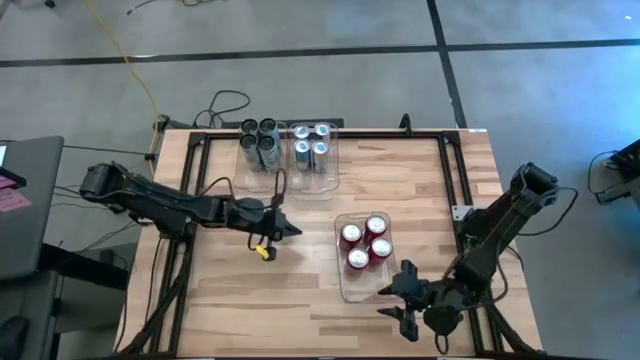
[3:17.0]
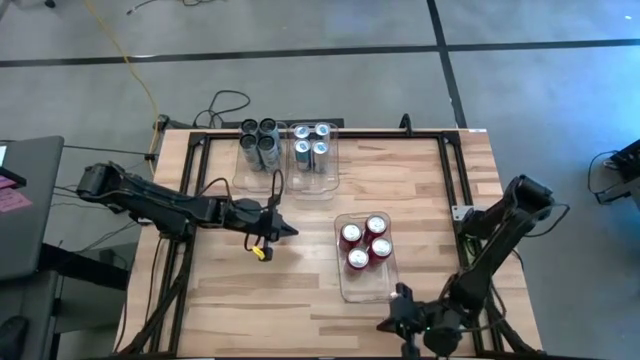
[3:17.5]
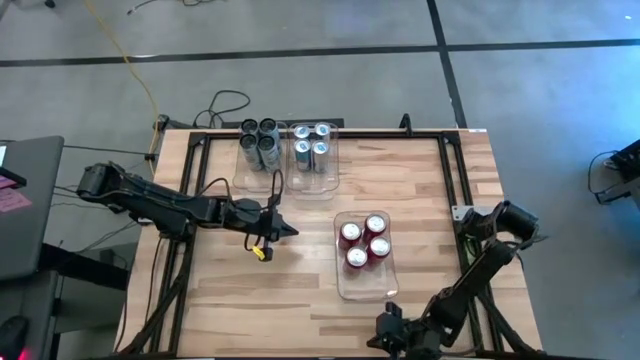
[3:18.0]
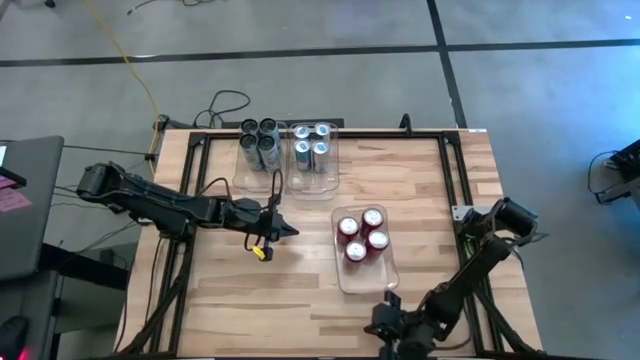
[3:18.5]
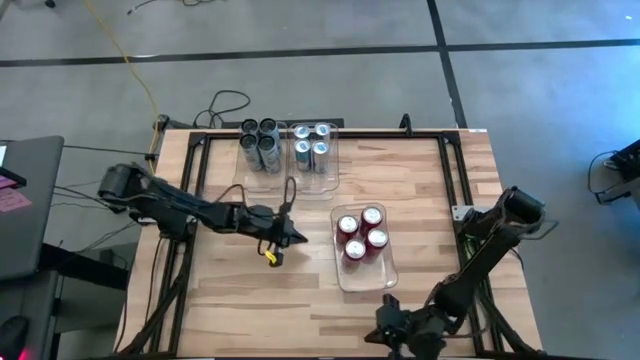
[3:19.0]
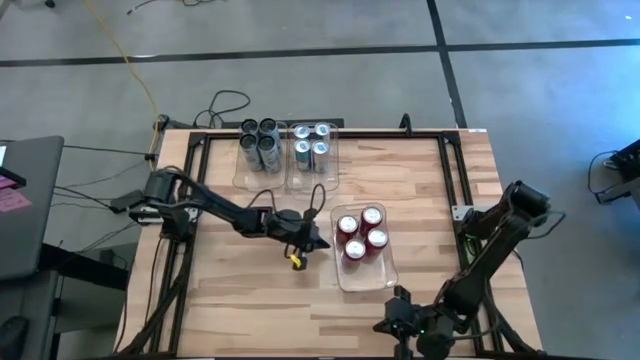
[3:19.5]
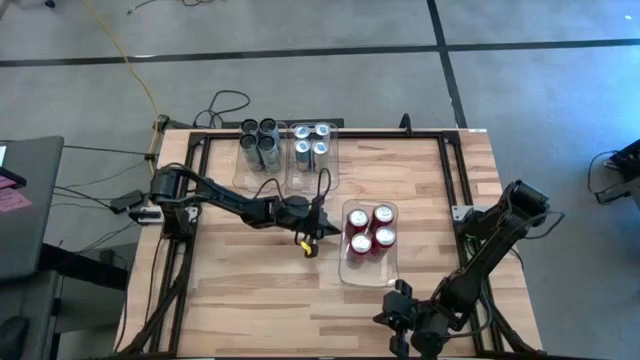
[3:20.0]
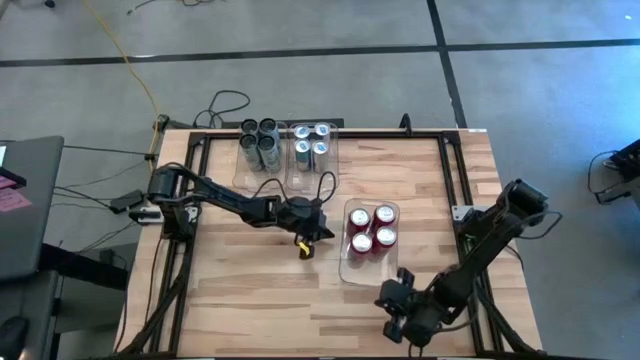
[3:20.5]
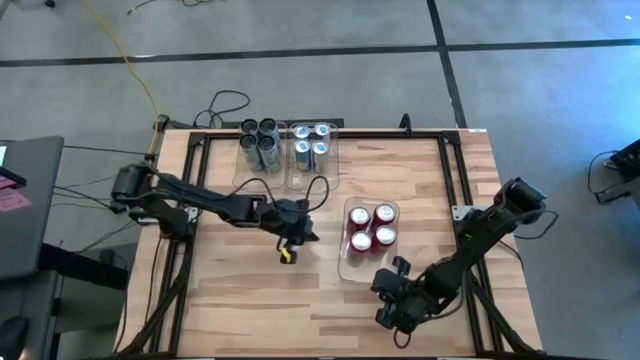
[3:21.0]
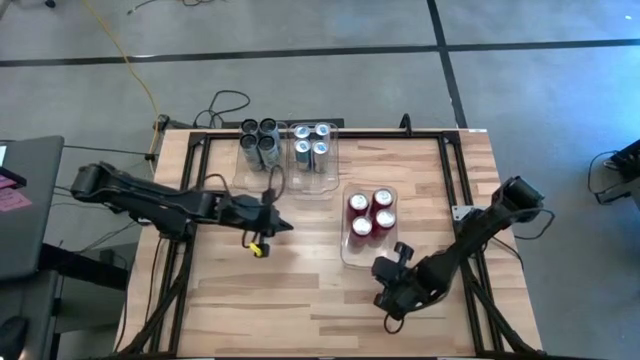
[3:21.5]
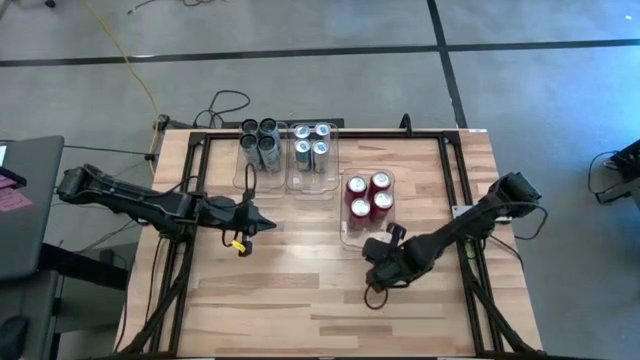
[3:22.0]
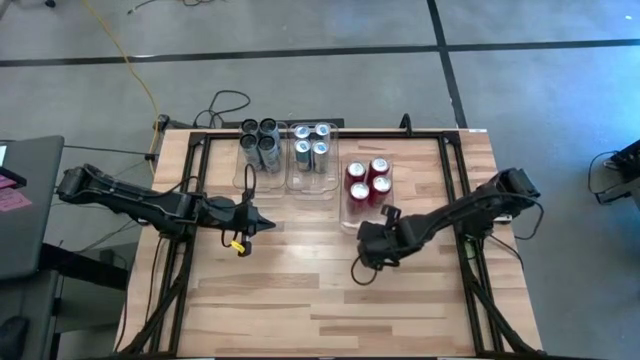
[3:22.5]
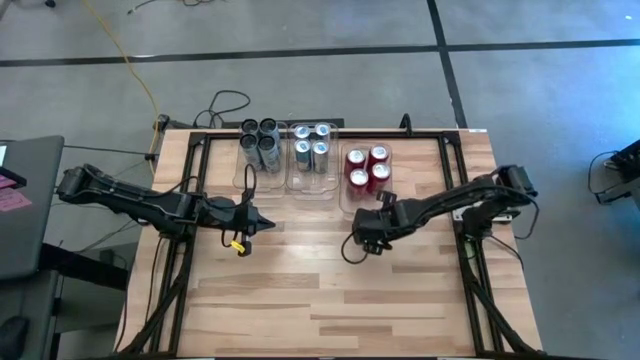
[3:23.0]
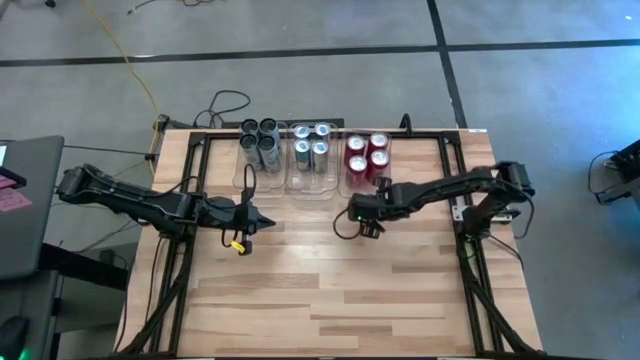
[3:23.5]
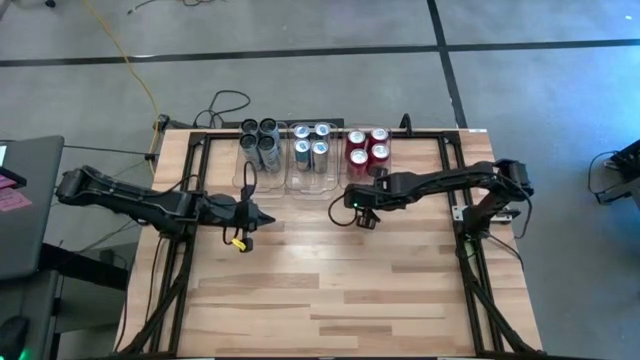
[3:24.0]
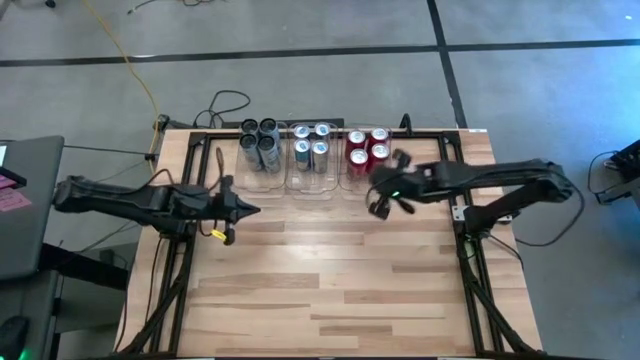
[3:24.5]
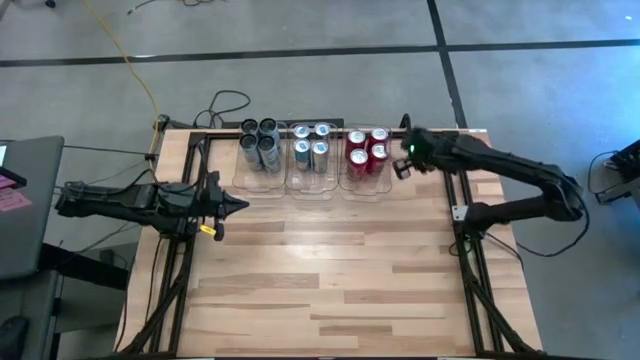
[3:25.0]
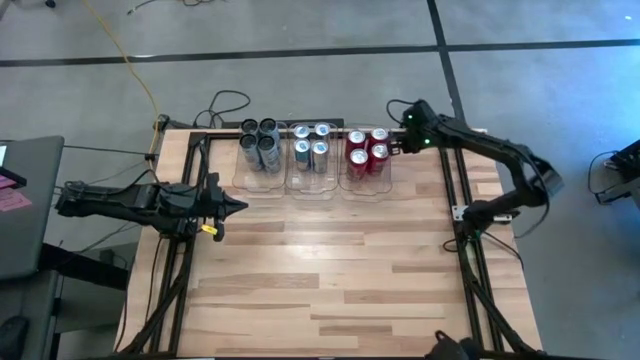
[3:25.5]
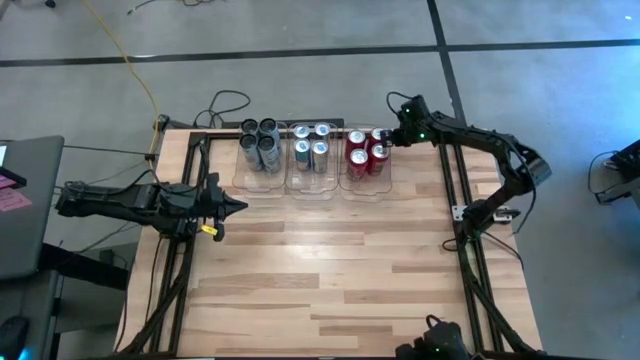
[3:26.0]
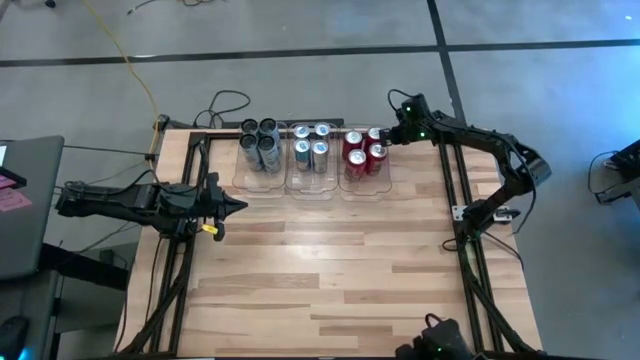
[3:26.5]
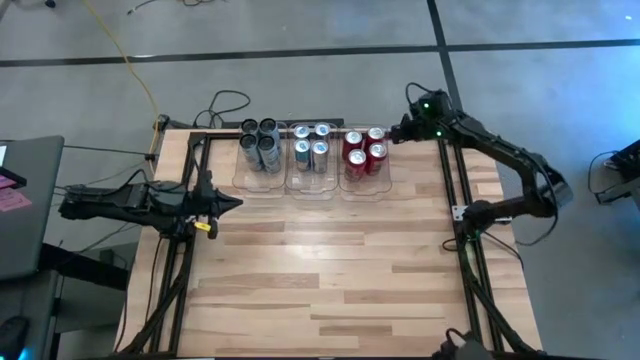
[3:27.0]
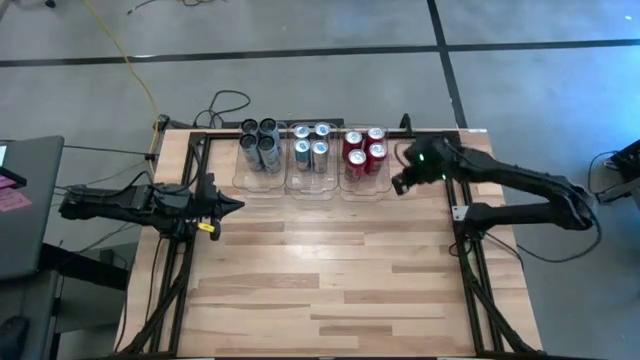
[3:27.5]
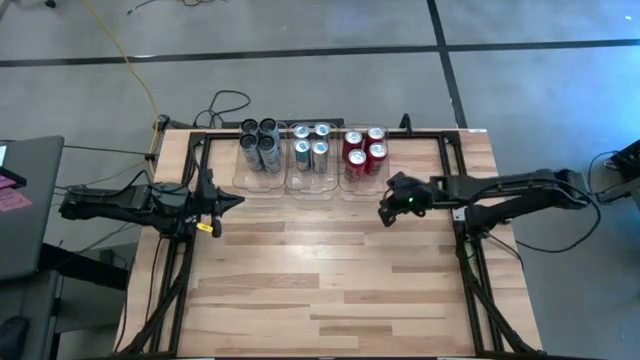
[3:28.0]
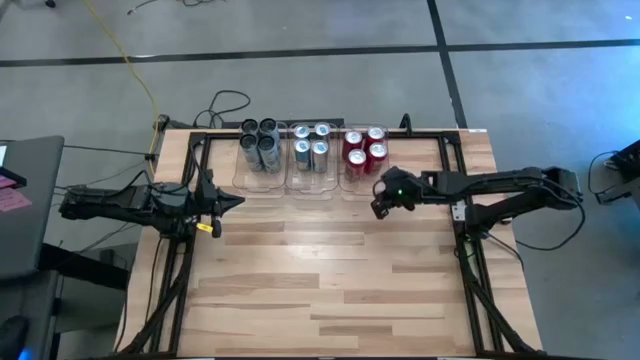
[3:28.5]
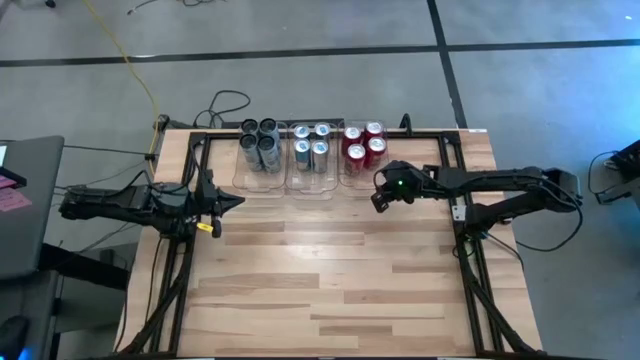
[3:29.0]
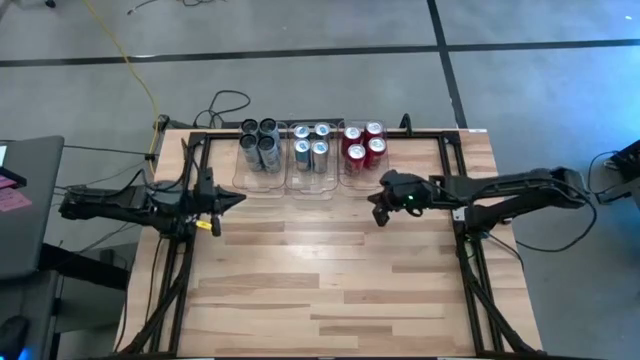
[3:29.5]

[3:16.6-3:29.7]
Task: Sort soda cans
Move the bottom transparent bin from the bottom to the top right

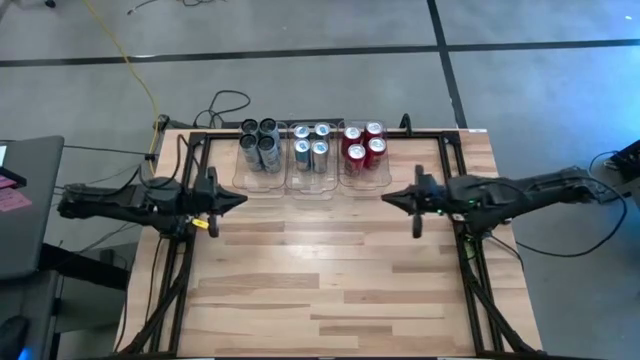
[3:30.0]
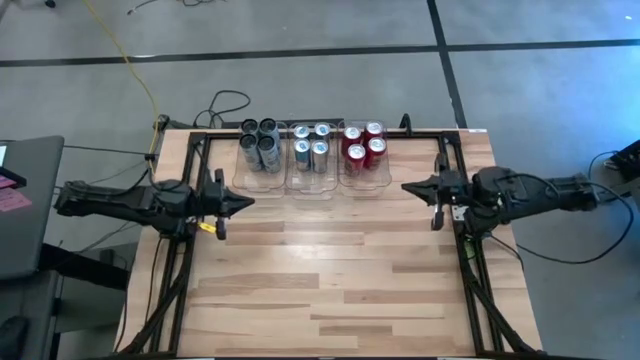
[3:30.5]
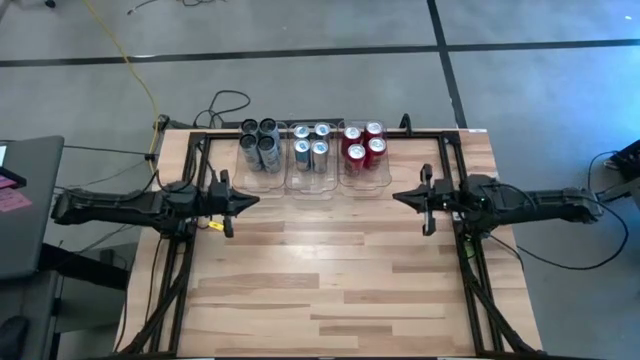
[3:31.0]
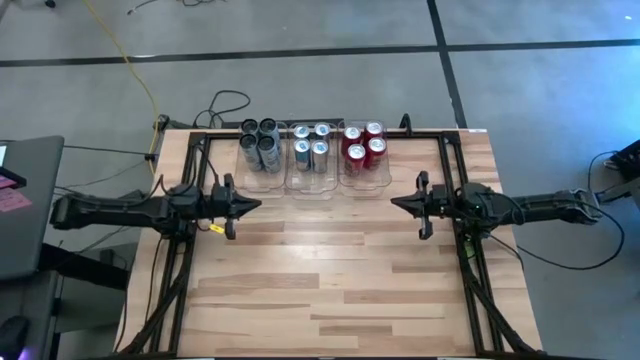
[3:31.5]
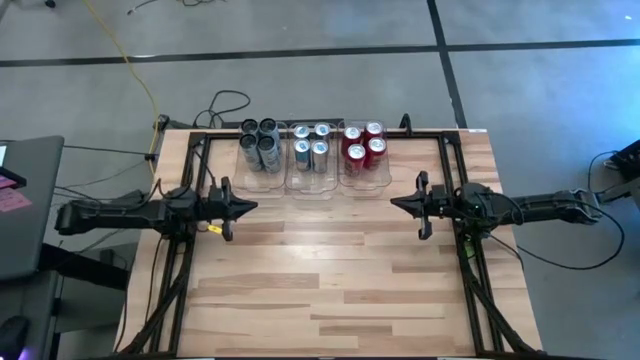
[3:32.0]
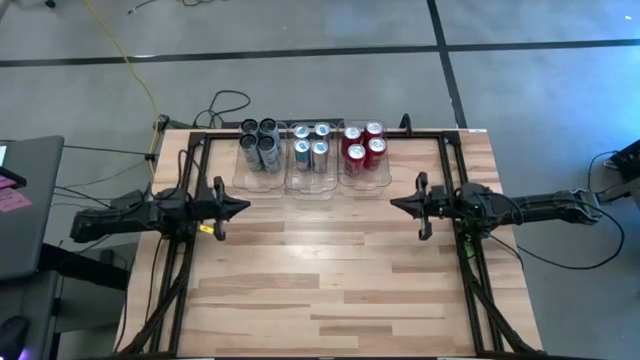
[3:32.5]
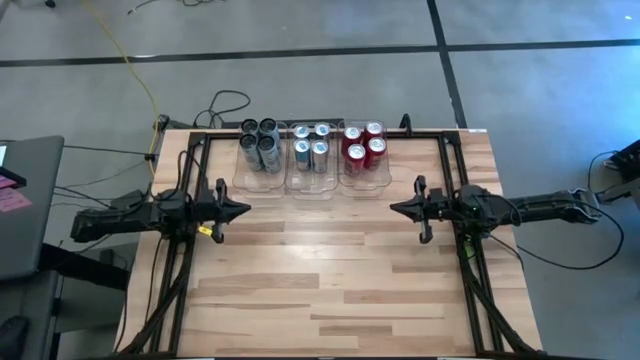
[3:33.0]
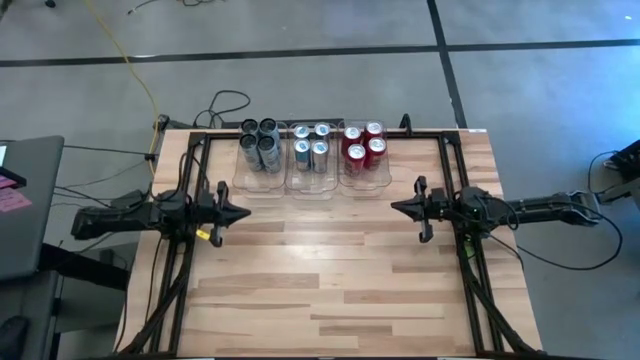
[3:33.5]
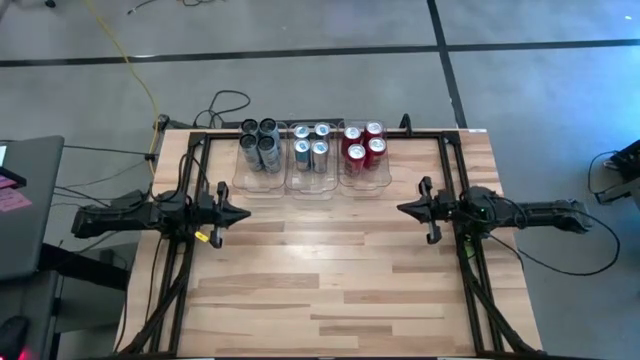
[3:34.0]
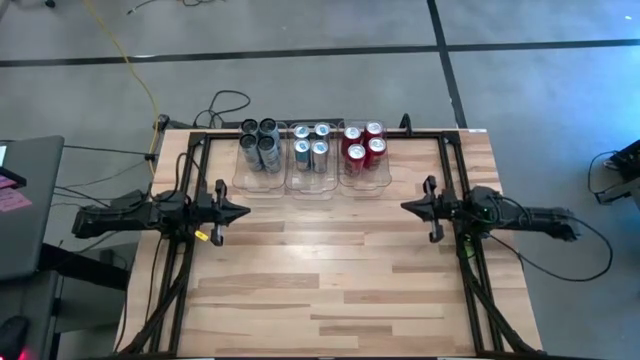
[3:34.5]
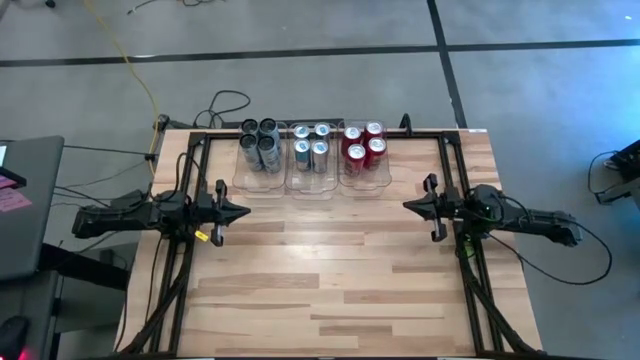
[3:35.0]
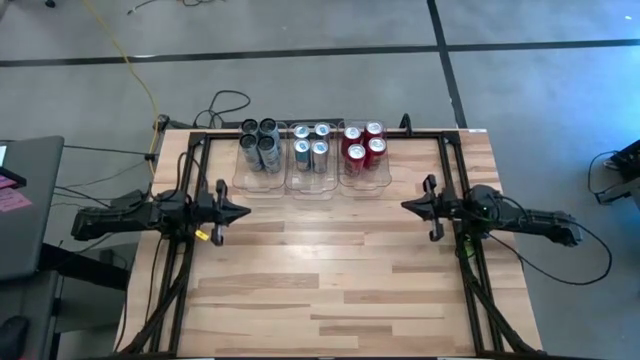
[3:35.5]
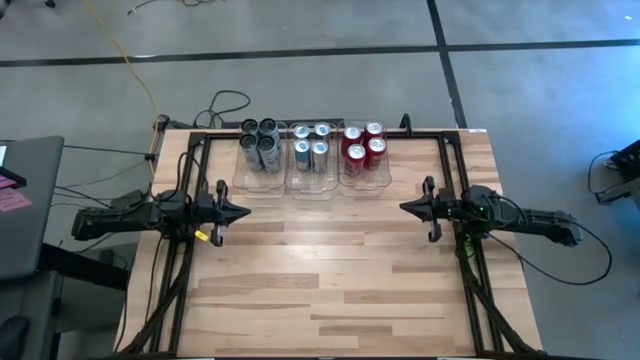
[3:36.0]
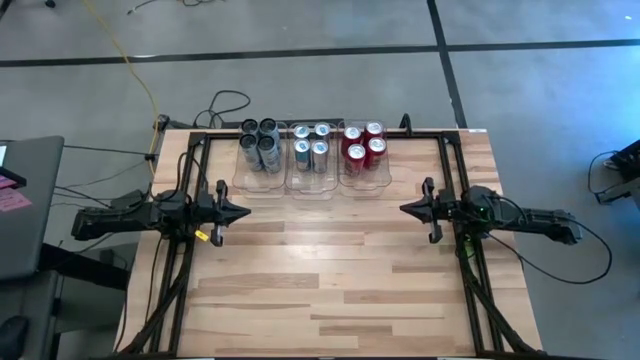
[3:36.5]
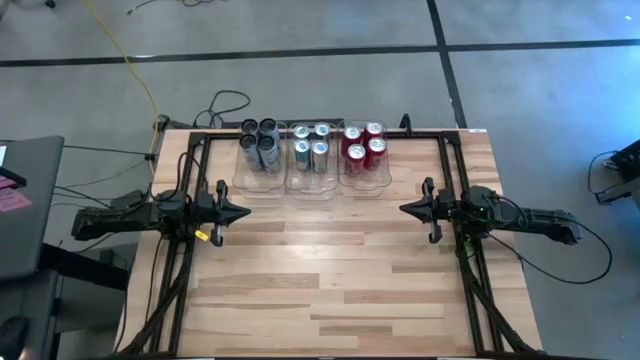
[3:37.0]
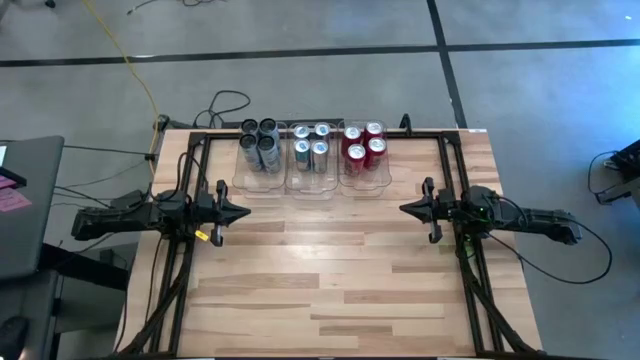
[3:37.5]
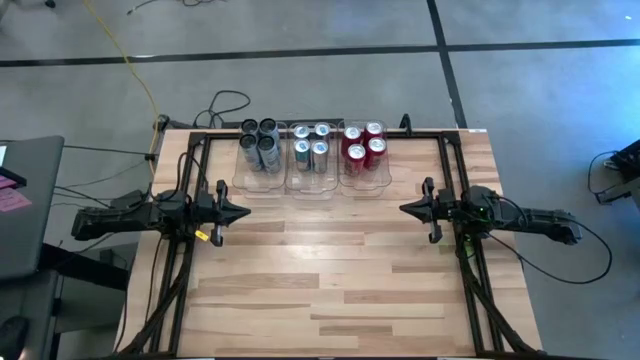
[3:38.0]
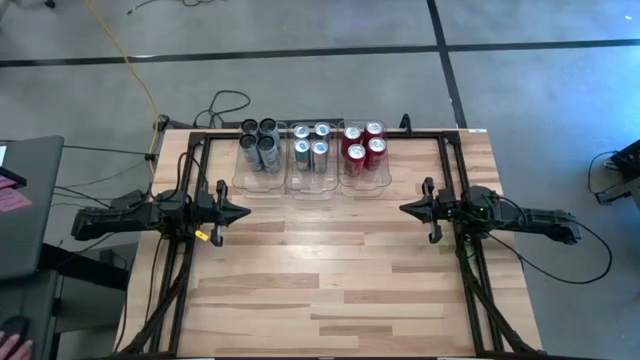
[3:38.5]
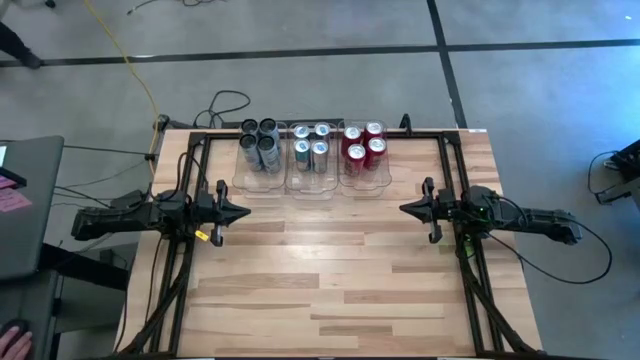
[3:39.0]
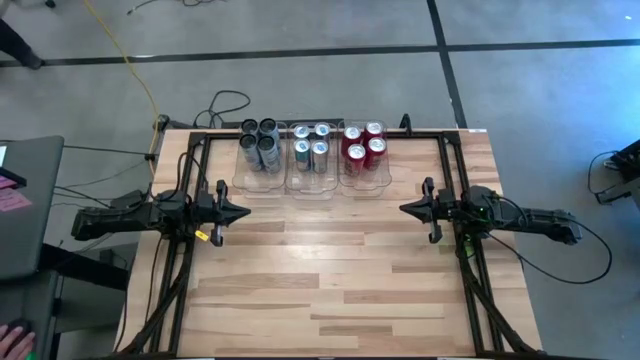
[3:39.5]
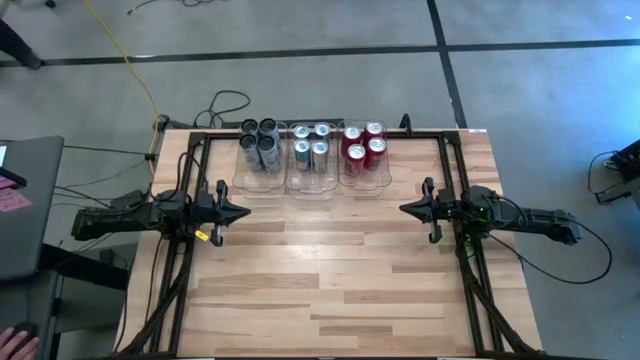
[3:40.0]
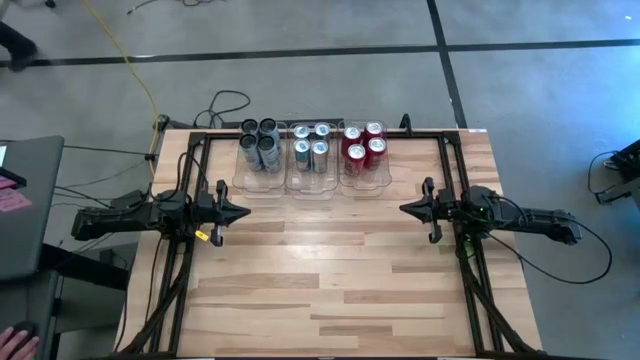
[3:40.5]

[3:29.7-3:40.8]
Return to Home Position
